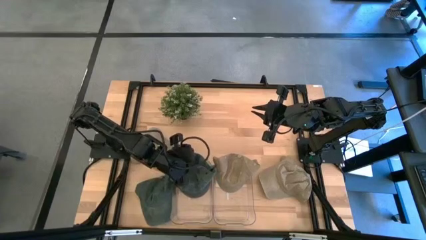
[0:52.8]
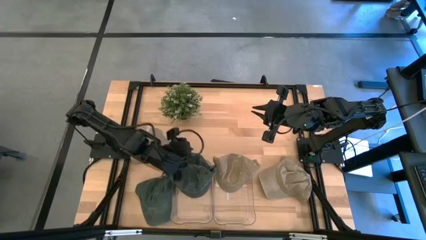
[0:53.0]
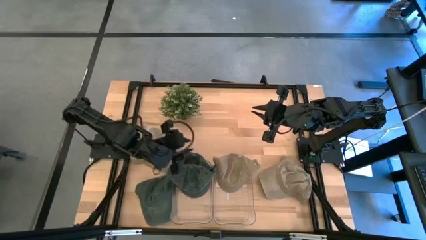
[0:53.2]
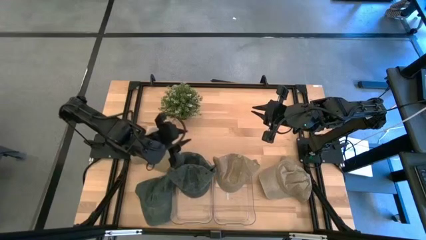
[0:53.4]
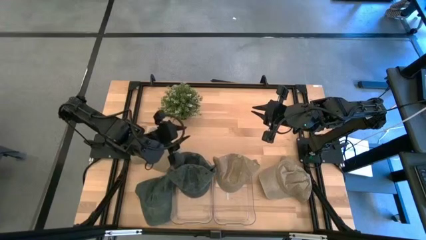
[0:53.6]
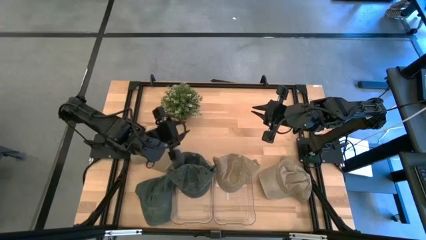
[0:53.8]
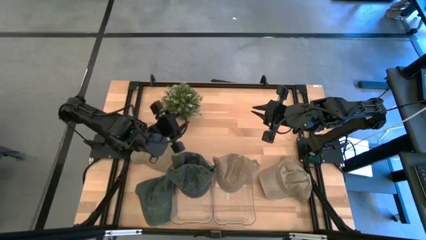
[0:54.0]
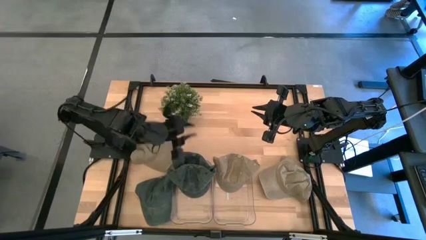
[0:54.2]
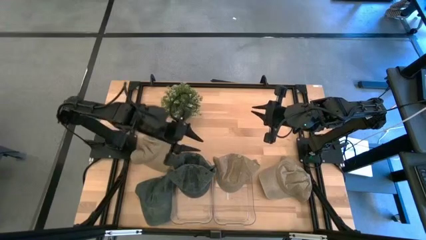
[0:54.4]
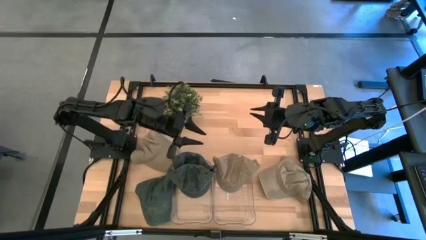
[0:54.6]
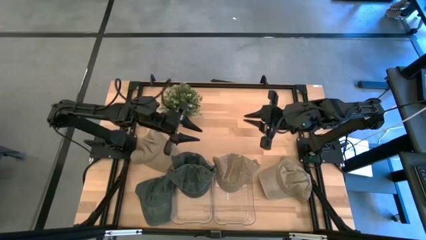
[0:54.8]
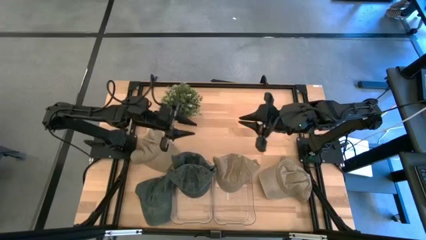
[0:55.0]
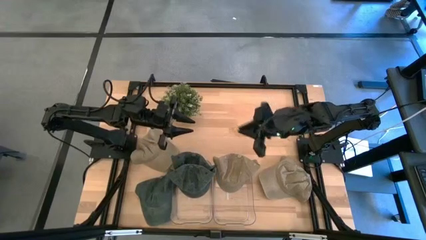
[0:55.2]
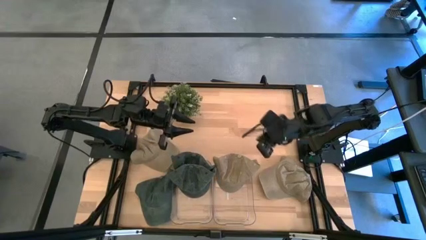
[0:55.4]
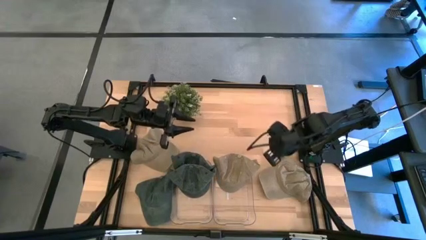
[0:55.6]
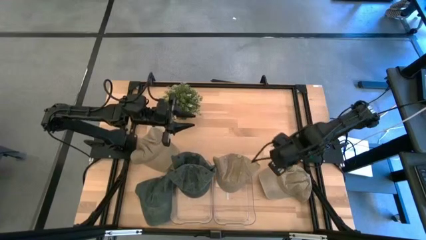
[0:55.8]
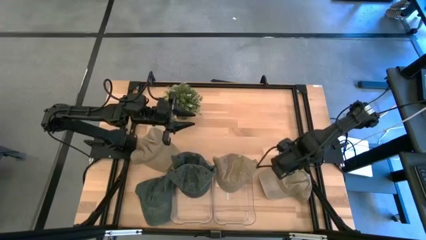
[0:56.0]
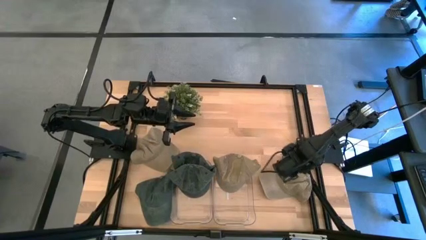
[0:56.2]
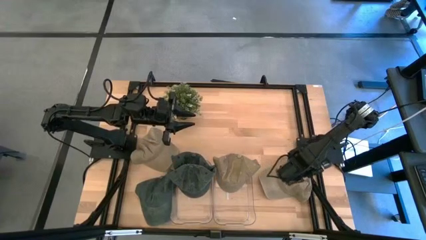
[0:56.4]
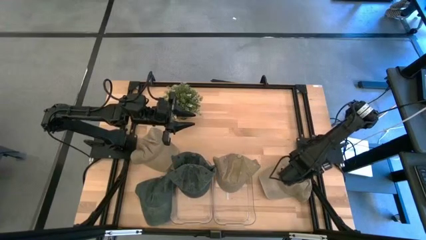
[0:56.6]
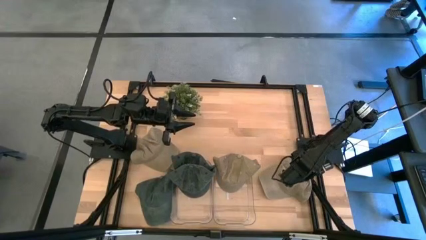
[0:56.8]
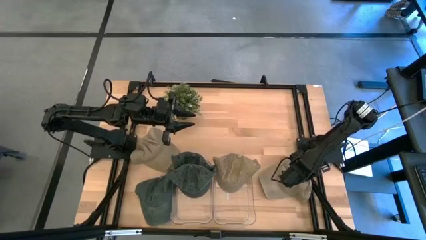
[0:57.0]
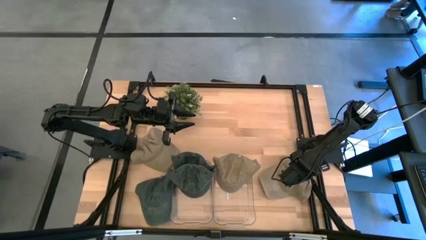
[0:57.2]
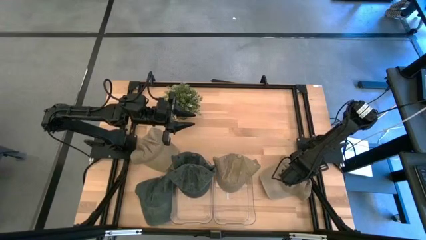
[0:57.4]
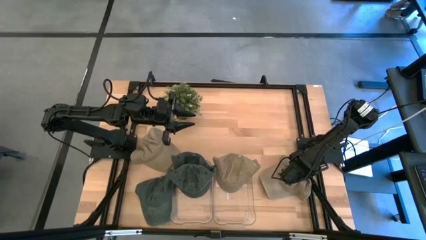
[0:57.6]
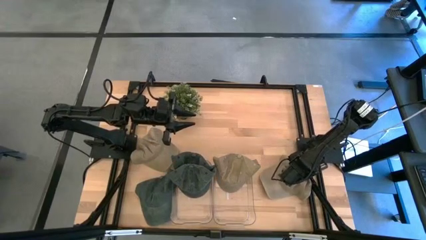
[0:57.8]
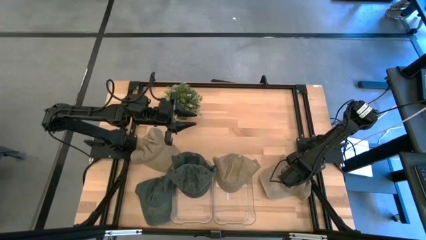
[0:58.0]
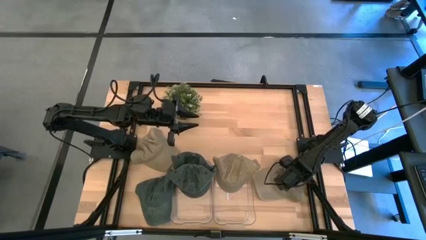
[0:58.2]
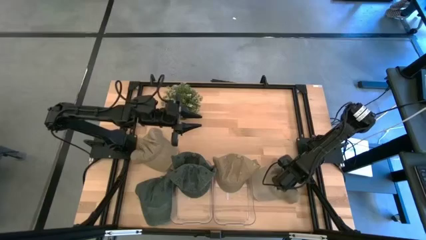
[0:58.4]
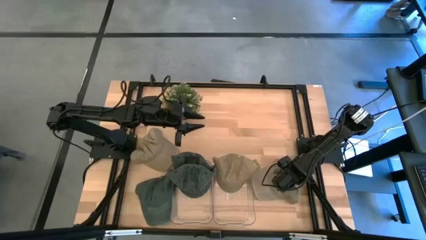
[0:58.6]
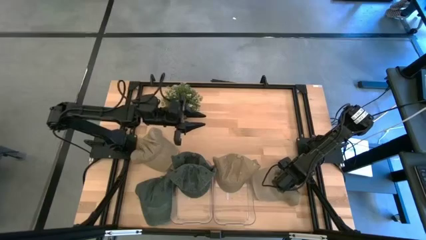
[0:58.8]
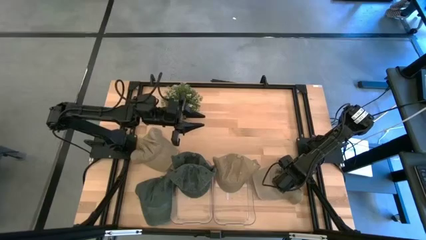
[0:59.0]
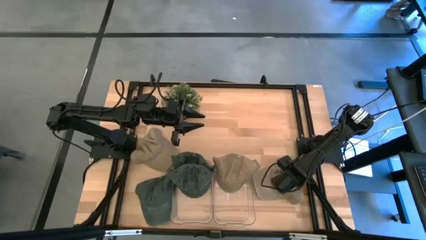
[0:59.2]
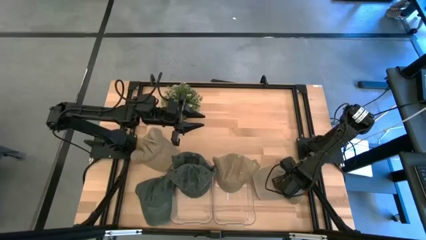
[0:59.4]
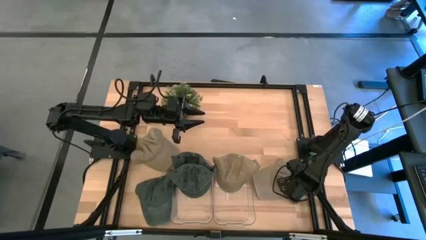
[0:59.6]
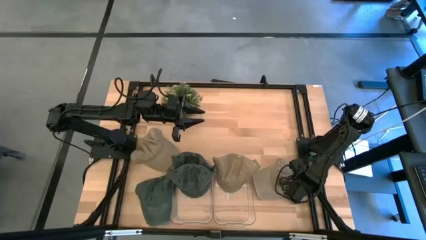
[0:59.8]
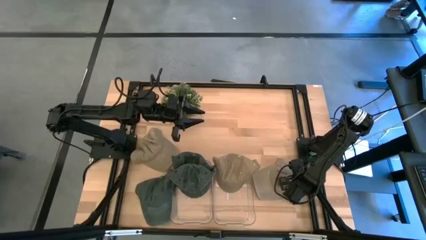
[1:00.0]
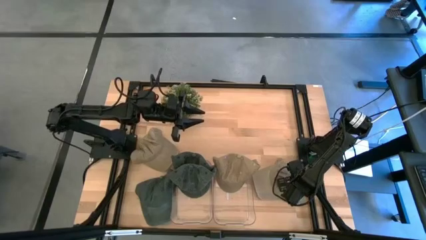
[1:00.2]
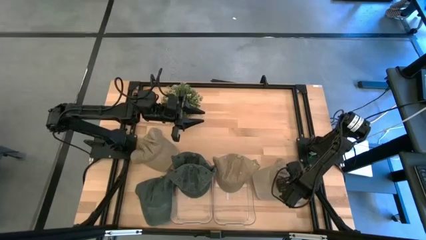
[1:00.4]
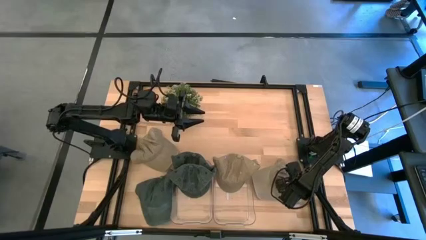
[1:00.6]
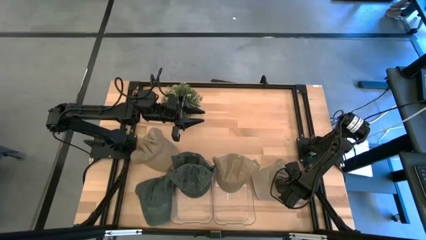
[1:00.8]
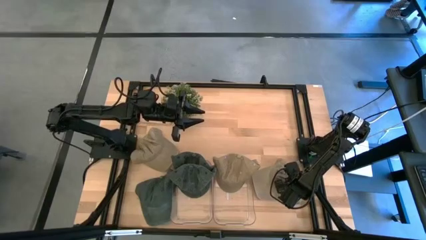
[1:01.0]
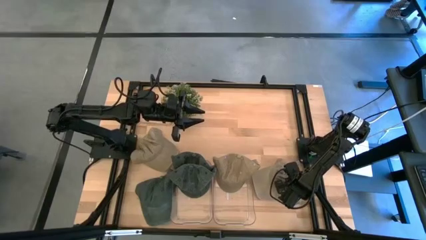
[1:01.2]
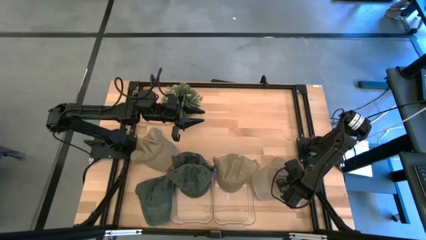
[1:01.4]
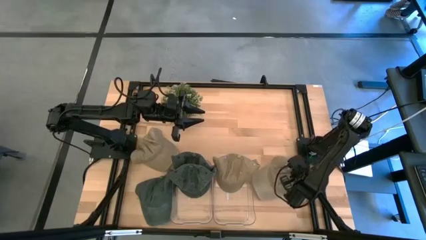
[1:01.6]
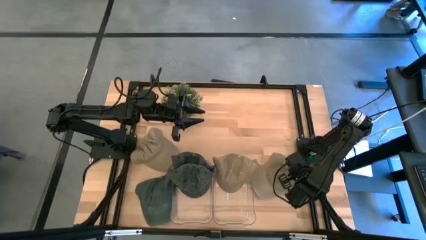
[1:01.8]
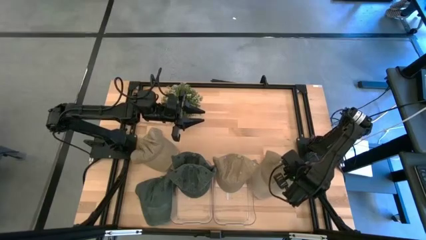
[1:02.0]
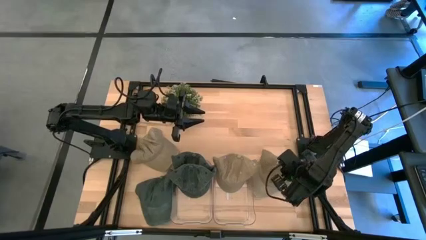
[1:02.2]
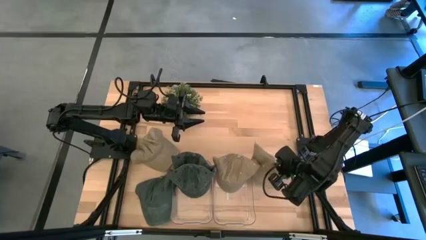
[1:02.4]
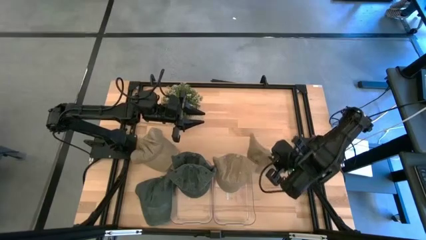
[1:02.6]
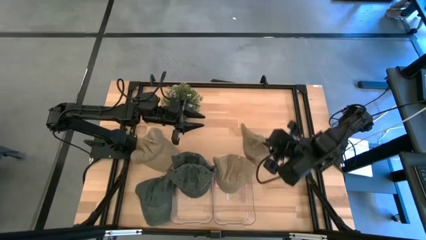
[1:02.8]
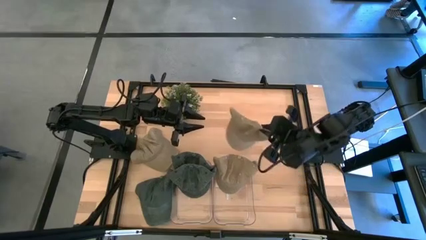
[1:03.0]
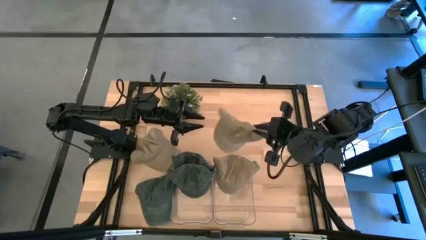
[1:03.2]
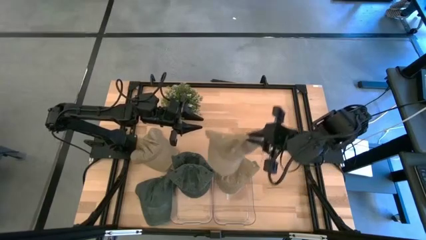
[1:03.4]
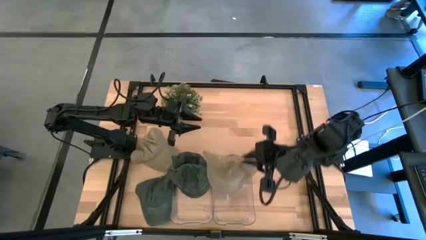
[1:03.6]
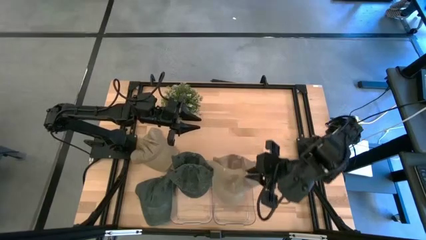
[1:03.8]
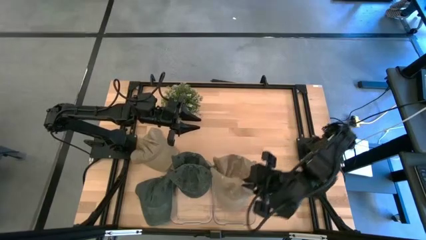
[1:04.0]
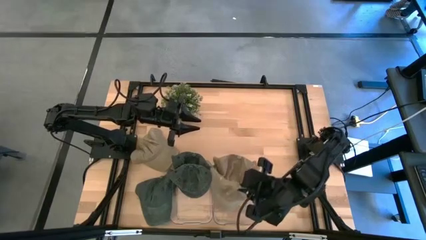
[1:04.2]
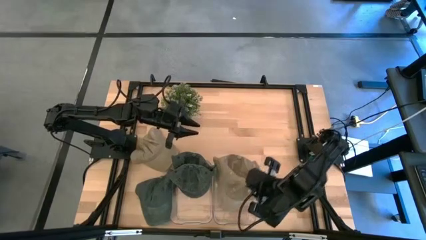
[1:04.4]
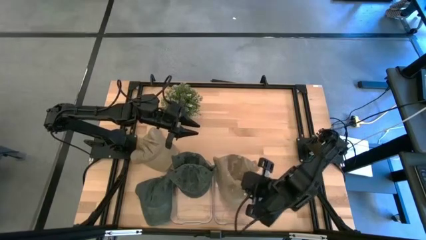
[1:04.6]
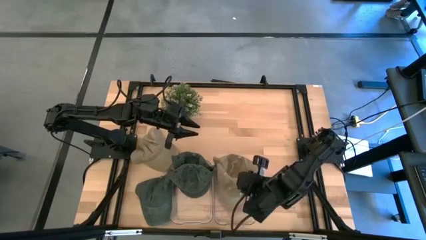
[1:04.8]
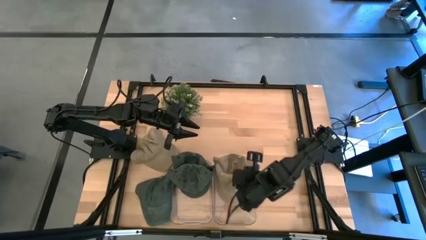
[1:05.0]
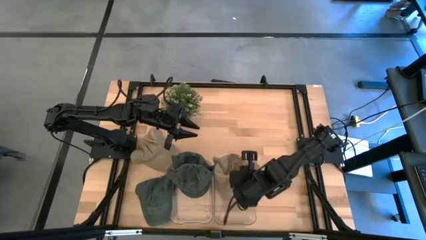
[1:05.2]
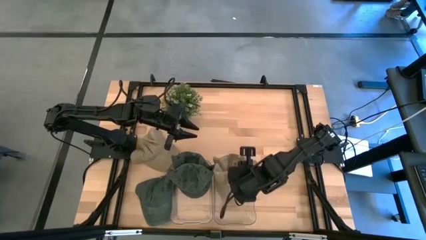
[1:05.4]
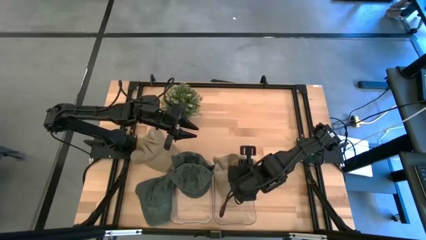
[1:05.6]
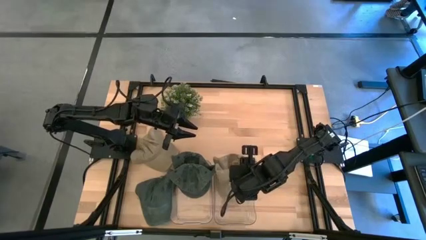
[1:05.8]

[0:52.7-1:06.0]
Task: Pick & Place hat
Put the right brown cap into the right transparent bin

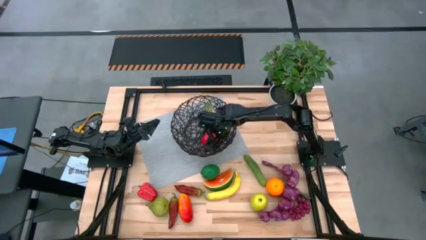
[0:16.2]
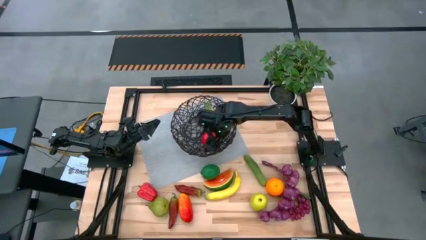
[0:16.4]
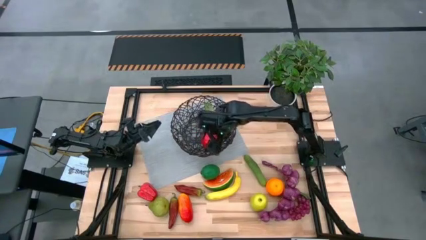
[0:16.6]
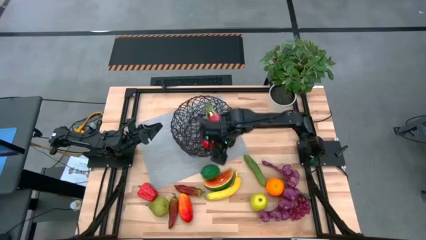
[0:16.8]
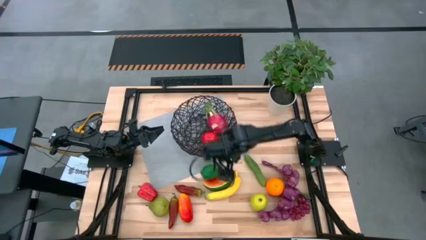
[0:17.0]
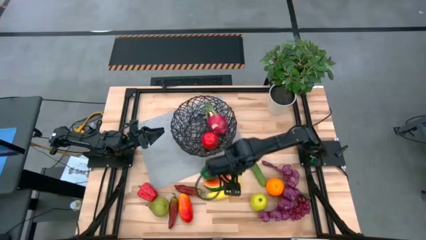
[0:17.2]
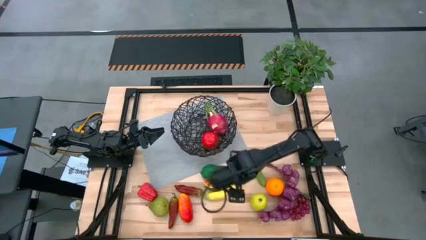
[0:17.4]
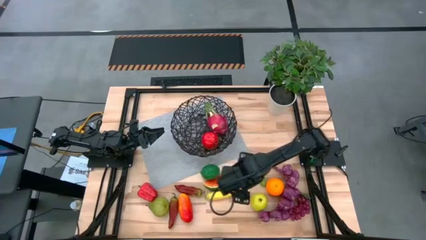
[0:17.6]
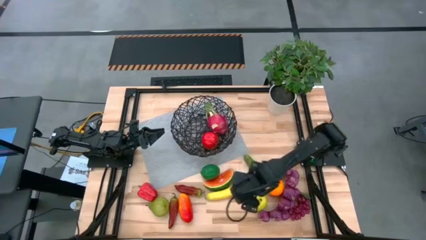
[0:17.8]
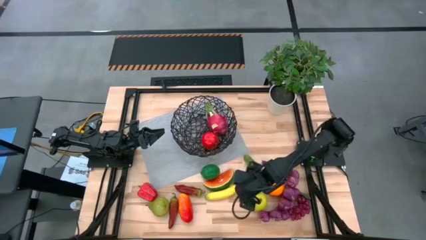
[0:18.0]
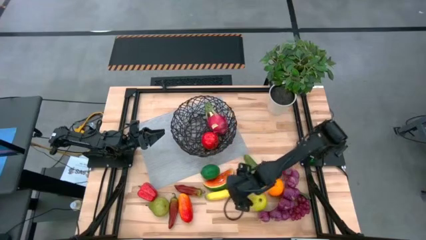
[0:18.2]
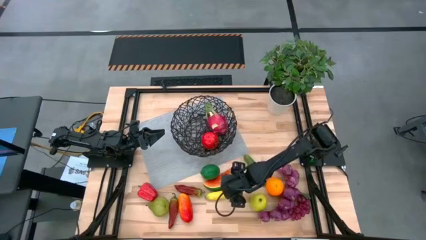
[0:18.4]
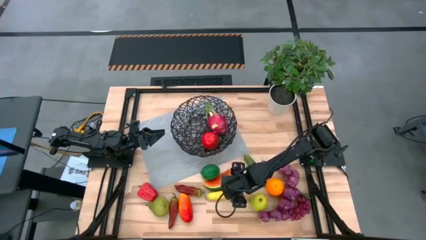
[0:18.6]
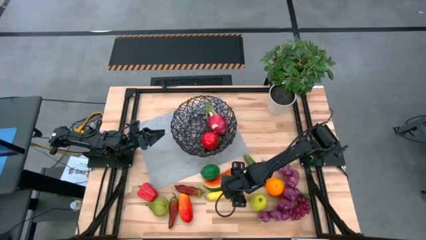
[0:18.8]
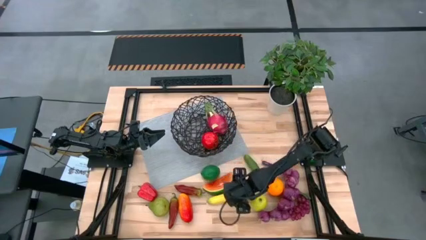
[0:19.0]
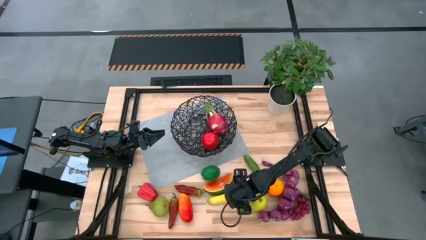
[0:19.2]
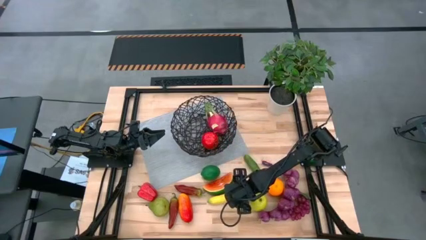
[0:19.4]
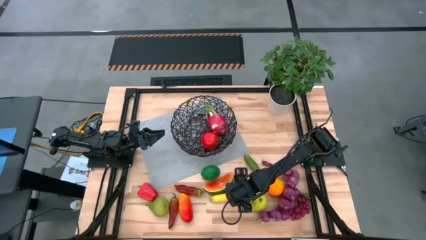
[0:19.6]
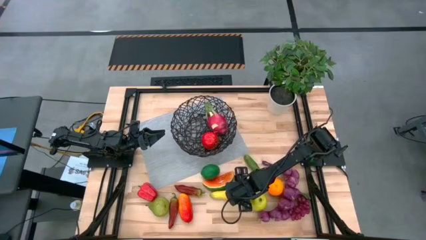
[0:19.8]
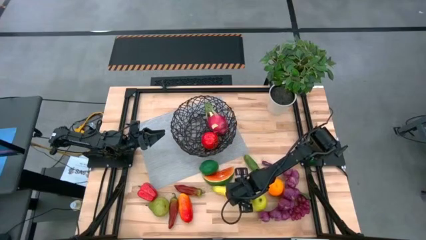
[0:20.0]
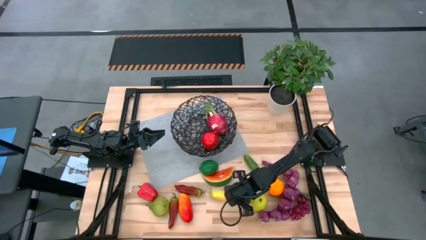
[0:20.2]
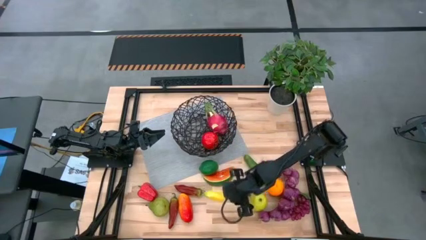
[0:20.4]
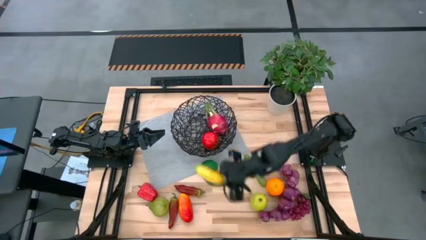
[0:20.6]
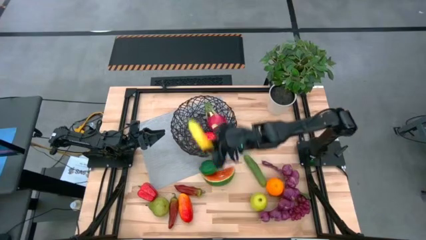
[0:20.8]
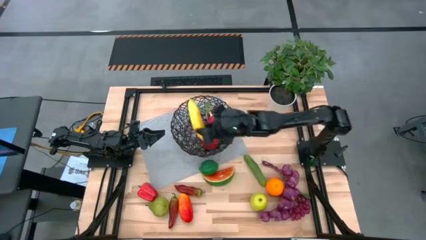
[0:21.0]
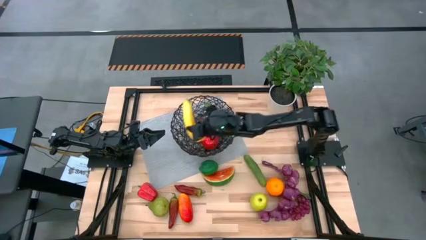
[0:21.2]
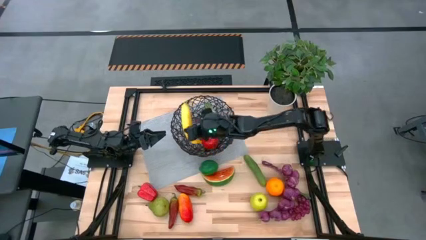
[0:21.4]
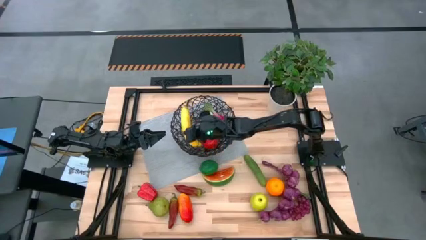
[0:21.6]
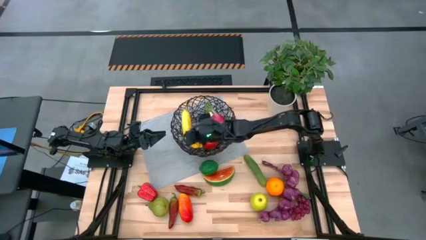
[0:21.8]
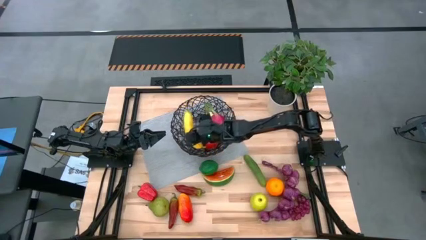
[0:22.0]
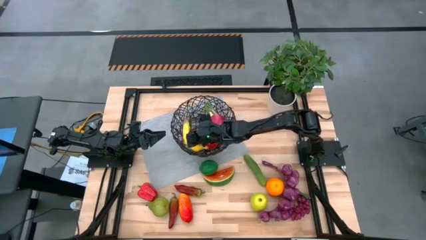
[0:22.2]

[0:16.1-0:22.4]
Task: Build produce basket
Put the banana into the wired basket
